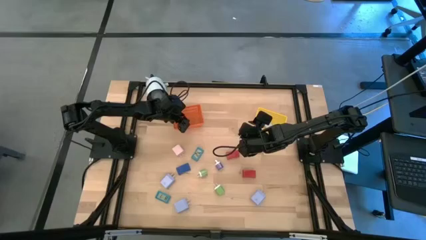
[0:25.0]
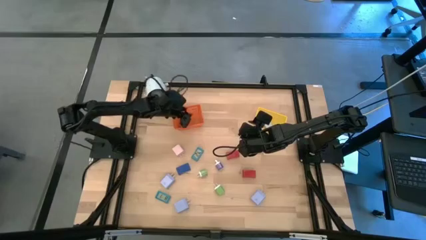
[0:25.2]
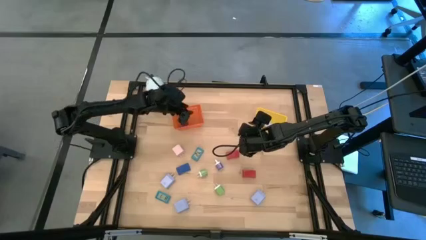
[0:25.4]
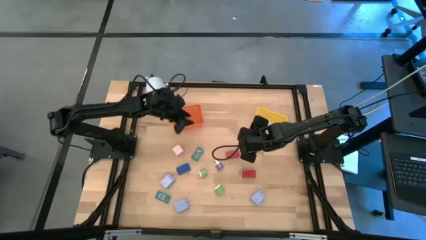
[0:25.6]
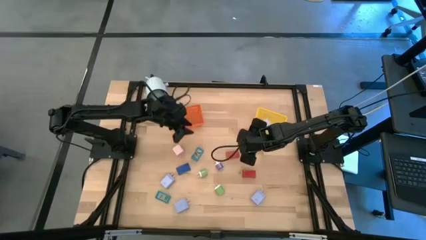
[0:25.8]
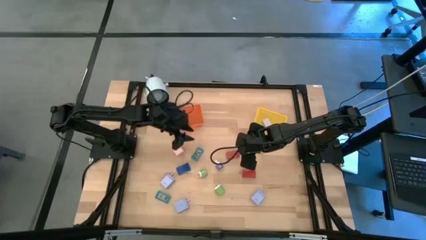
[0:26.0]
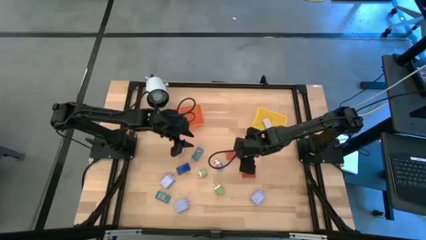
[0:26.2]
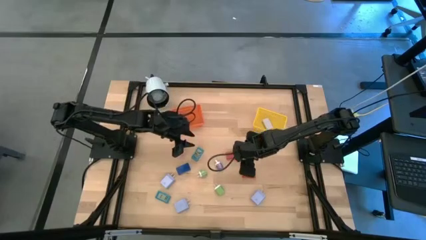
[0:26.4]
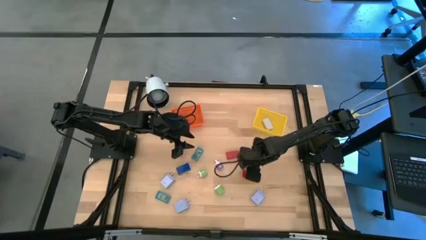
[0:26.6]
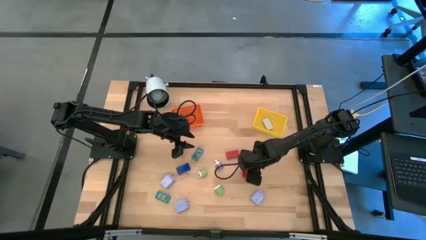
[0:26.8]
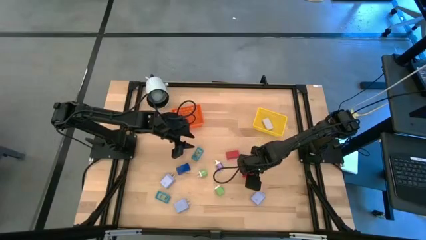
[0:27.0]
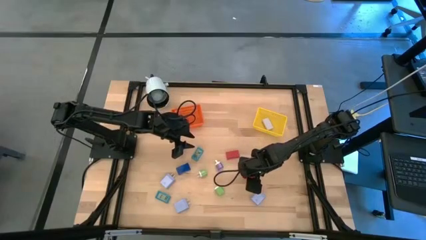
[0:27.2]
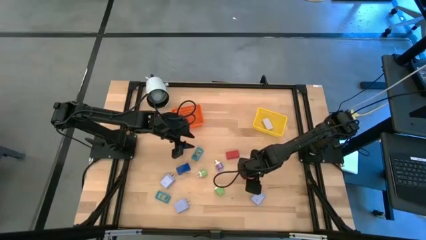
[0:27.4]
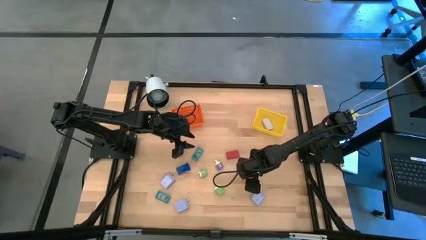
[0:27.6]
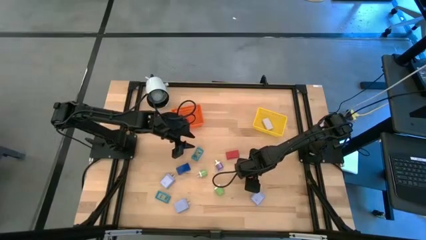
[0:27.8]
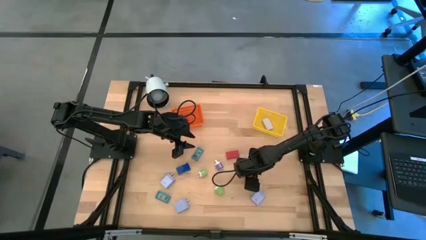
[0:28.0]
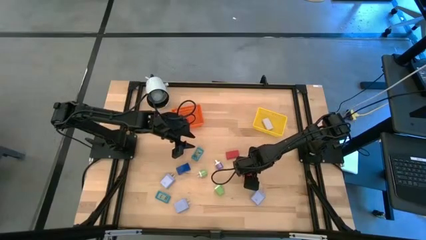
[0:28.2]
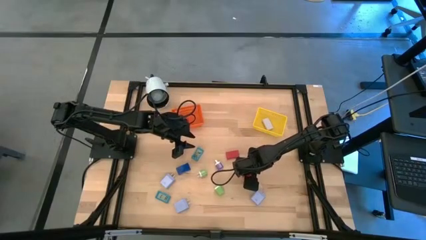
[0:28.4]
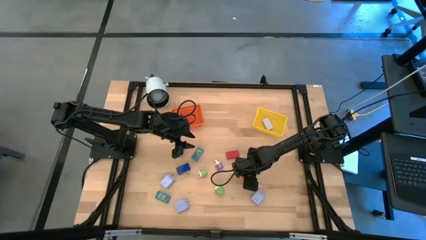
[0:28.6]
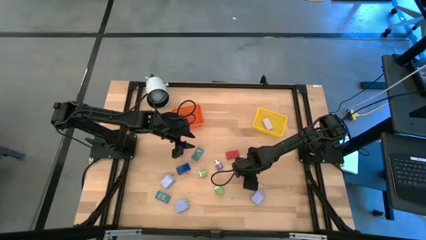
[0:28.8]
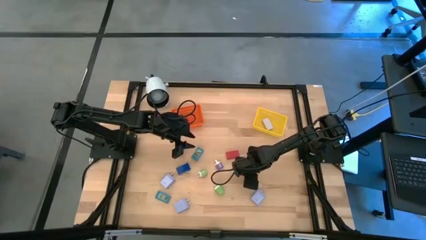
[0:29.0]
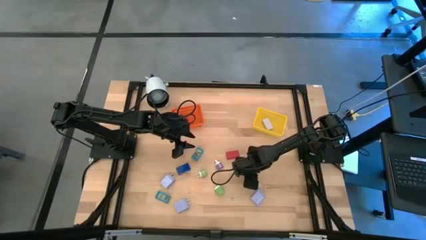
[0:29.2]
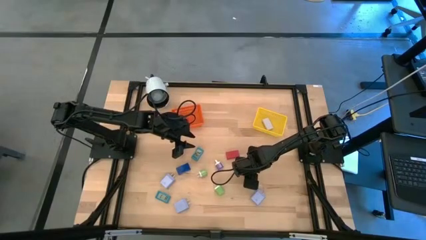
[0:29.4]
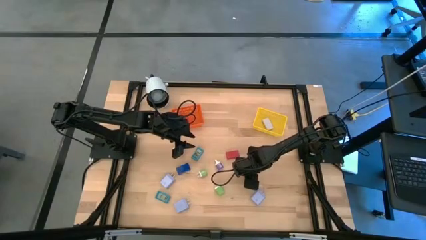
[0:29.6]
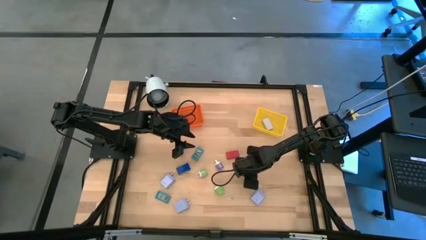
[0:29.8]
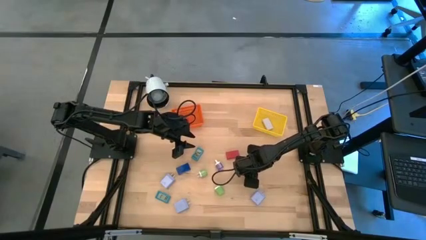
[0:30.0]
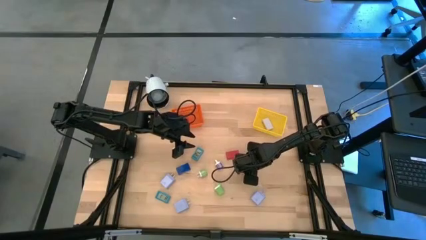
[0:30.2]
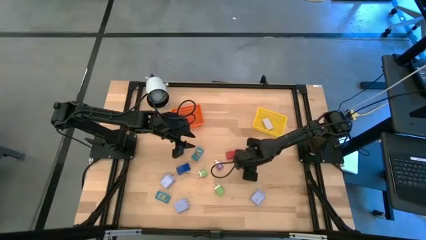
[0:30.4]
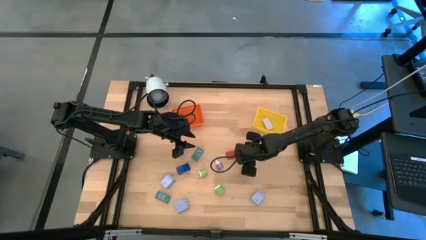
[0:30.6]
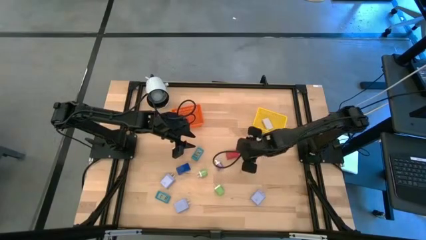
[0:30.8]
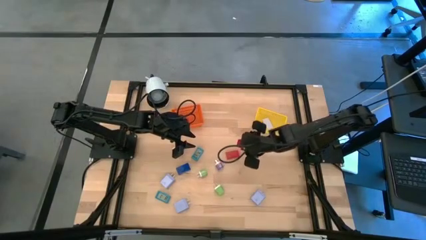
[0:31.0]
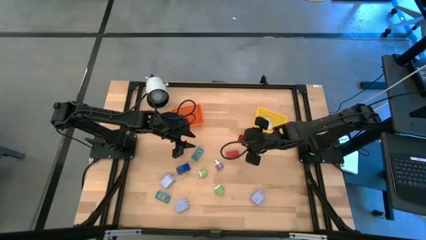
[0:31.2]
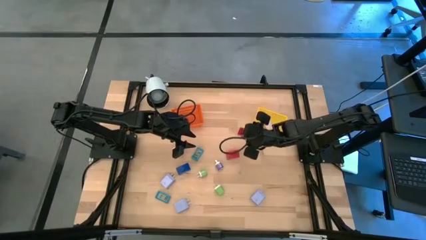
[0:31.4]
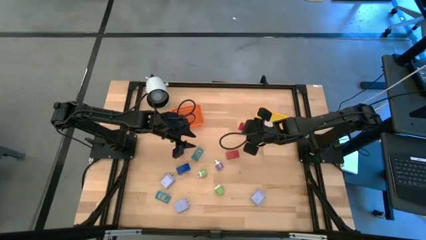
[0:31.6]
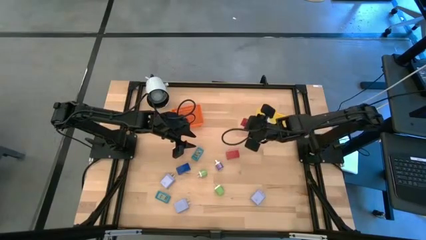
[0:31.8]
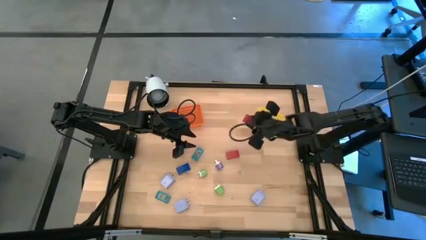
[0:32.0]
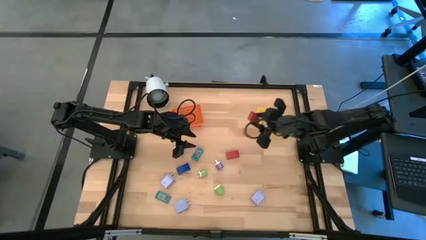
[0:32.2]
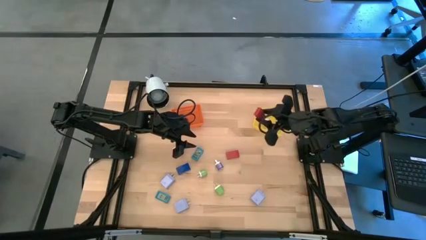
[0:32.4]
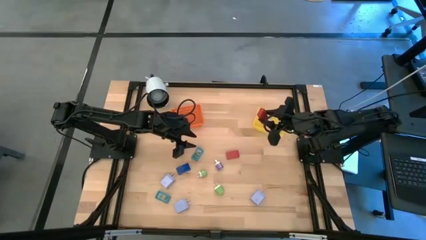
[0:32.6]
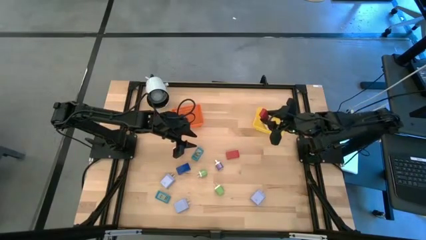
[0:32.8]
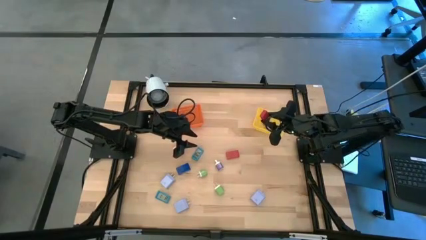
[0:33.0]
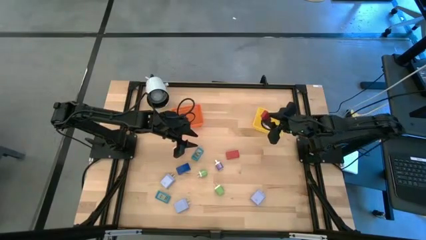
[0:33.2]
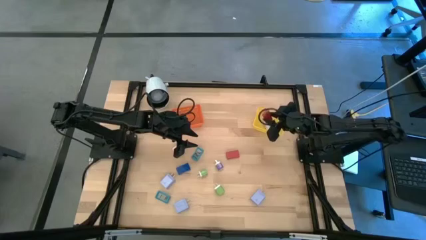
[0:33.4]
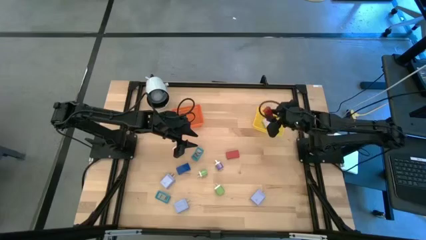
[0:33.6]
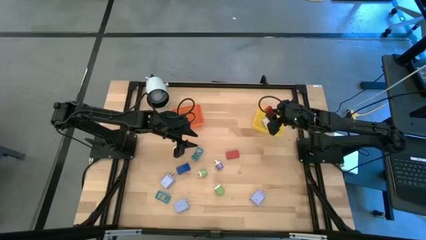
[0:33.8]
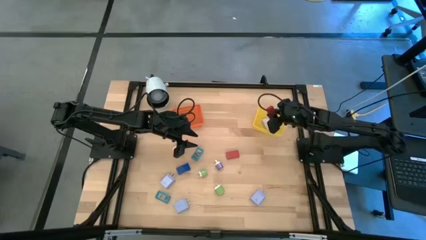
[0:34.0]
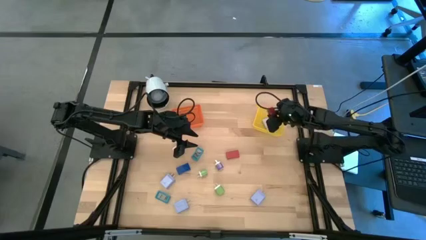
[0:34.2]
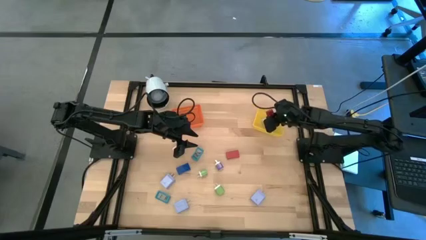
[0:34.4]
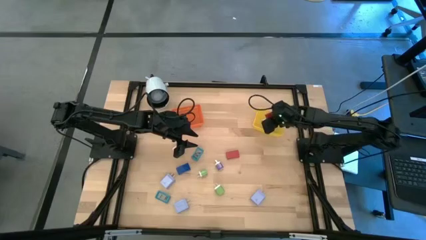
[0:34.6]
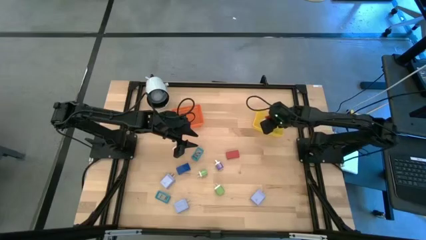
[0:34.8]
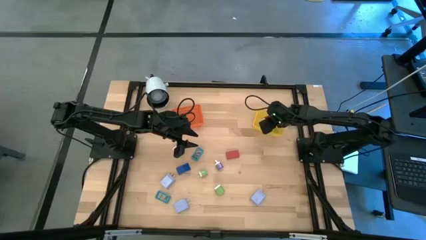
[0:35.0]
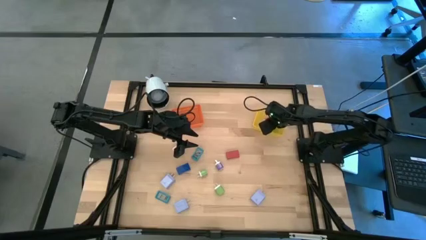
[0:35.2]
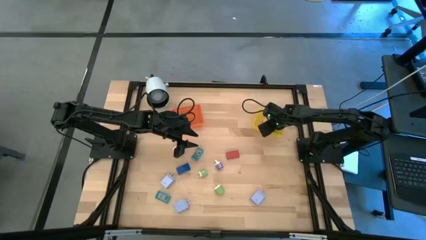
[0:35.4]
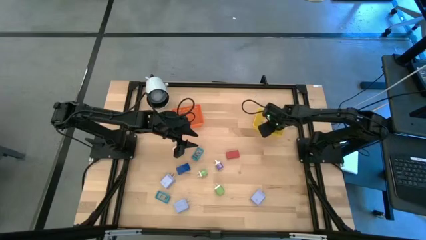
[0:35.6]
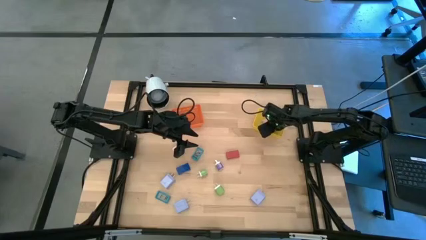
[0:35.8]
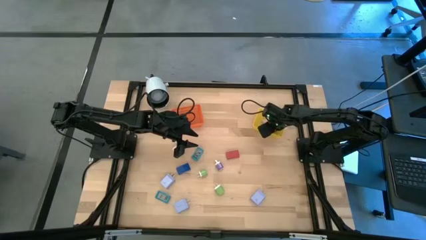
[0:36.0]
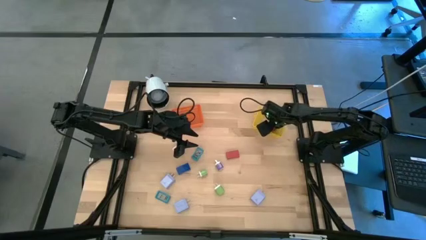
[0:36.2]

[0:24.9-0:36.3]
Task: Pick & Place Office items
Put the bottom red digital clock into the yellow bin
